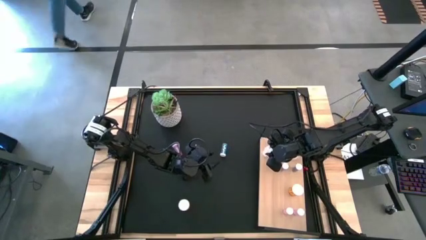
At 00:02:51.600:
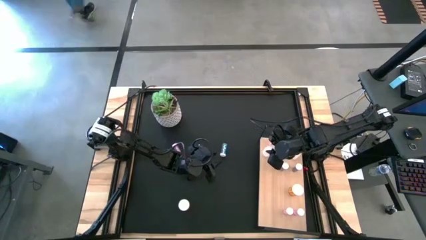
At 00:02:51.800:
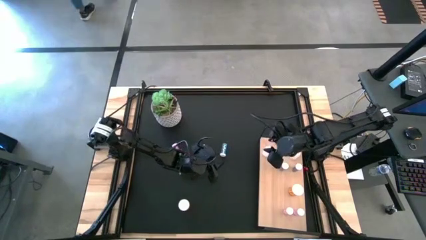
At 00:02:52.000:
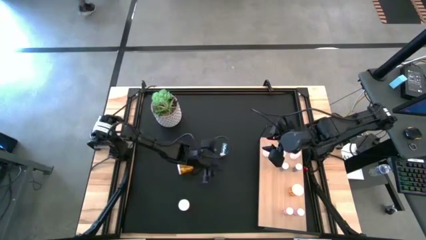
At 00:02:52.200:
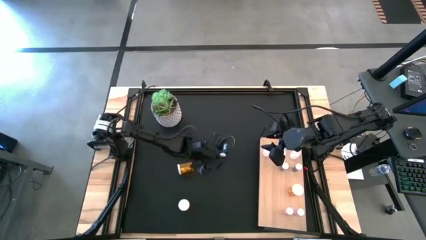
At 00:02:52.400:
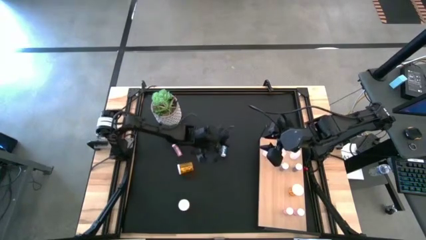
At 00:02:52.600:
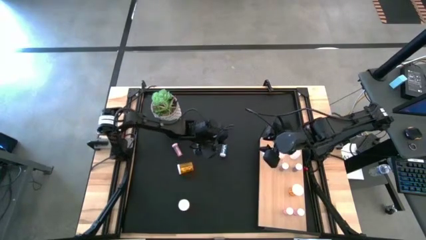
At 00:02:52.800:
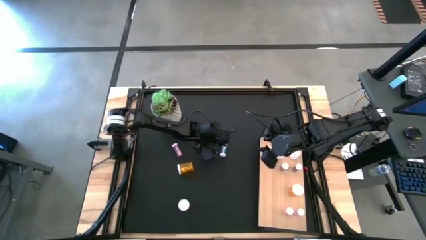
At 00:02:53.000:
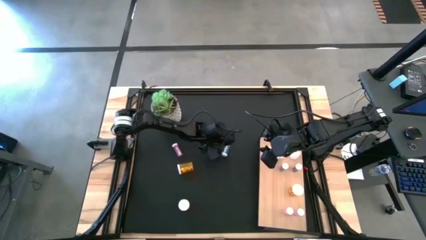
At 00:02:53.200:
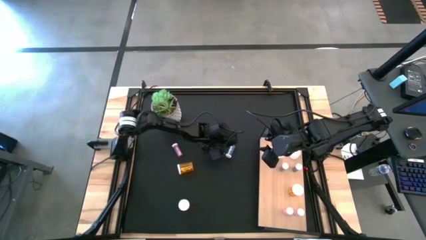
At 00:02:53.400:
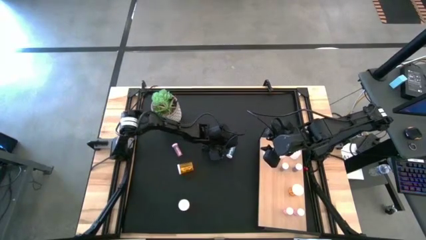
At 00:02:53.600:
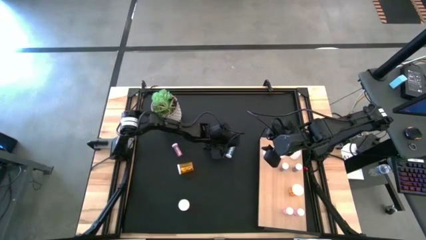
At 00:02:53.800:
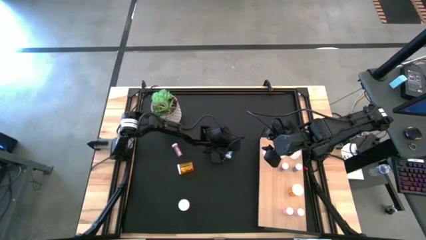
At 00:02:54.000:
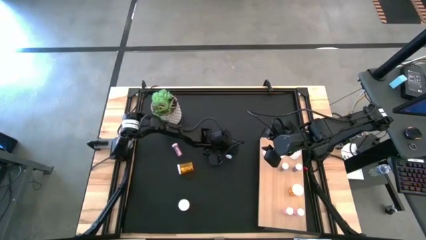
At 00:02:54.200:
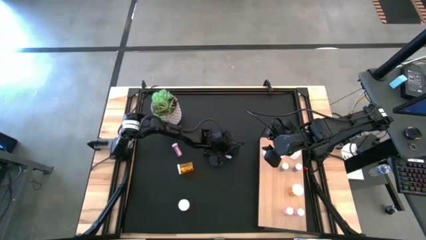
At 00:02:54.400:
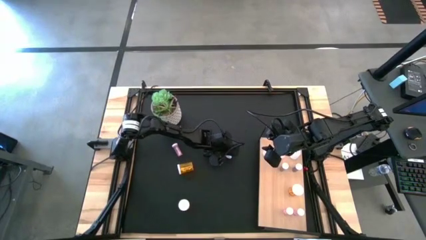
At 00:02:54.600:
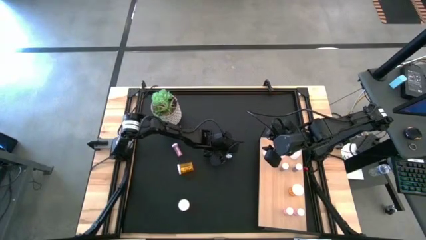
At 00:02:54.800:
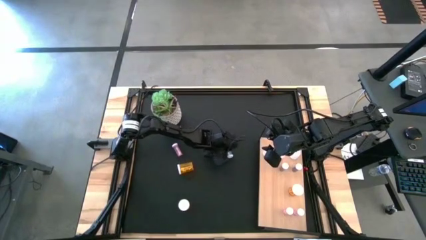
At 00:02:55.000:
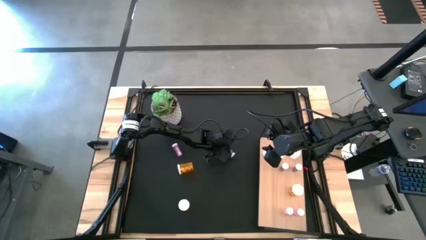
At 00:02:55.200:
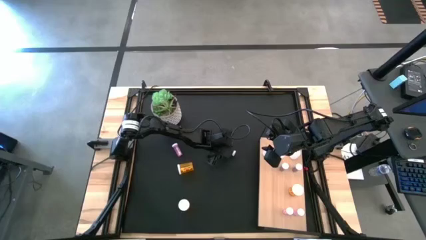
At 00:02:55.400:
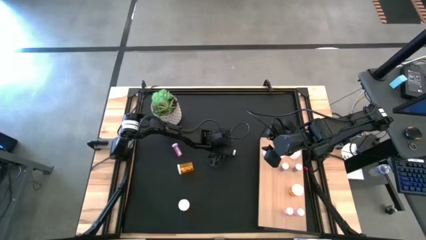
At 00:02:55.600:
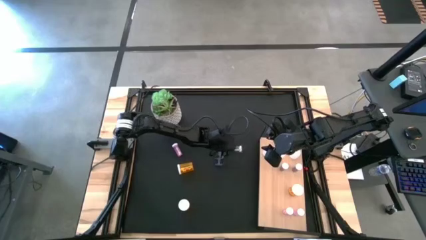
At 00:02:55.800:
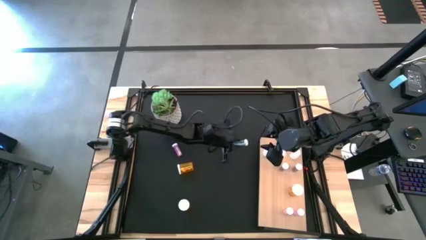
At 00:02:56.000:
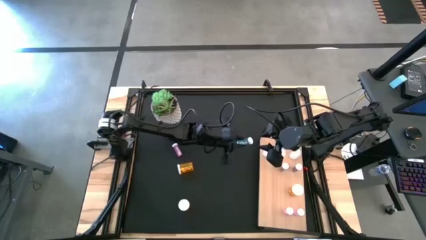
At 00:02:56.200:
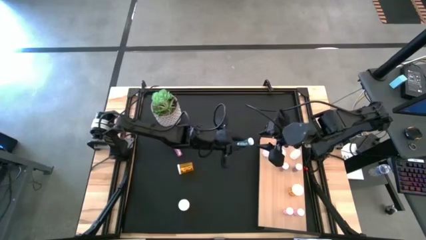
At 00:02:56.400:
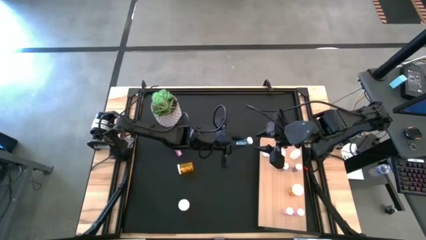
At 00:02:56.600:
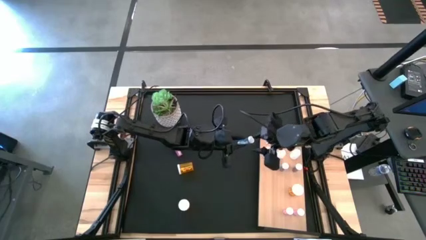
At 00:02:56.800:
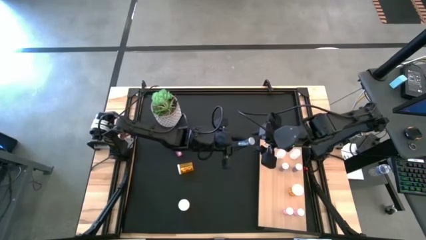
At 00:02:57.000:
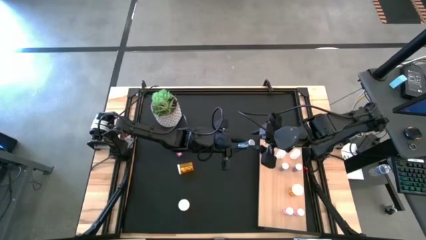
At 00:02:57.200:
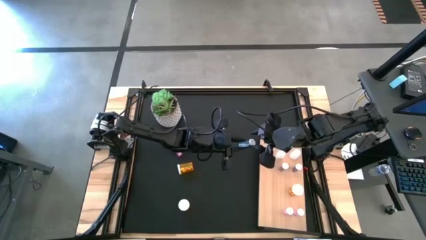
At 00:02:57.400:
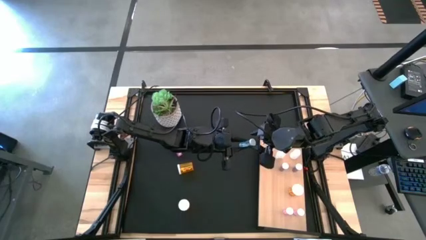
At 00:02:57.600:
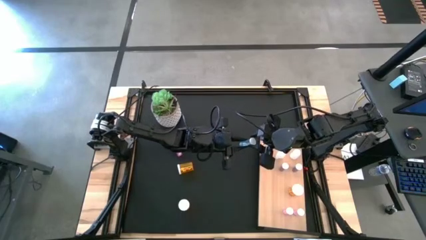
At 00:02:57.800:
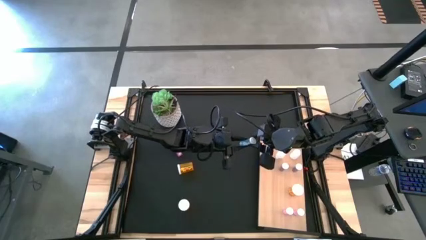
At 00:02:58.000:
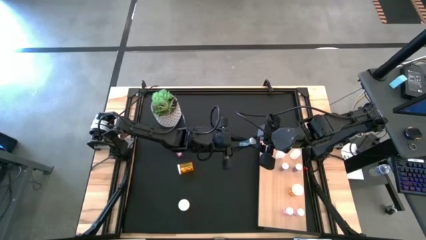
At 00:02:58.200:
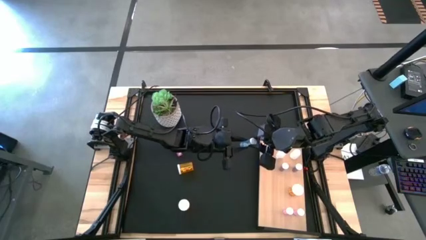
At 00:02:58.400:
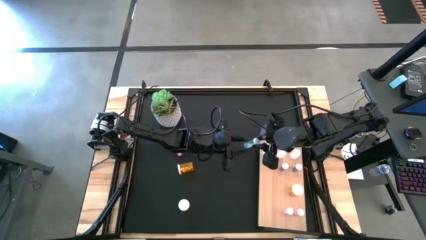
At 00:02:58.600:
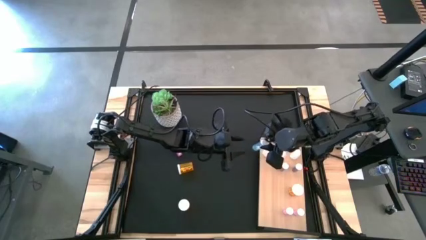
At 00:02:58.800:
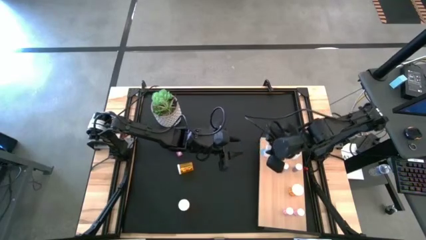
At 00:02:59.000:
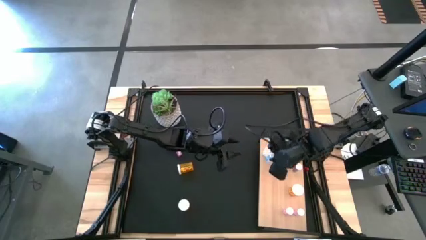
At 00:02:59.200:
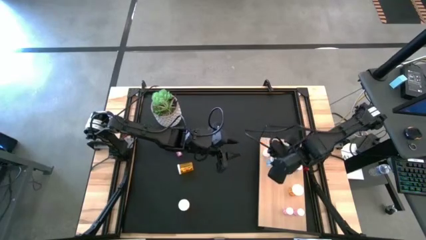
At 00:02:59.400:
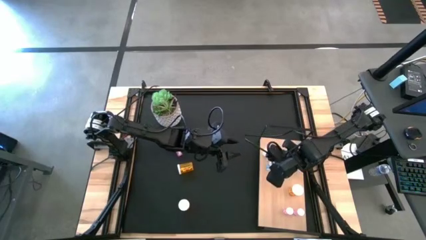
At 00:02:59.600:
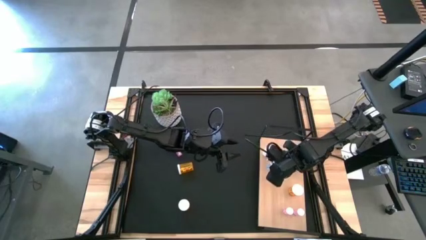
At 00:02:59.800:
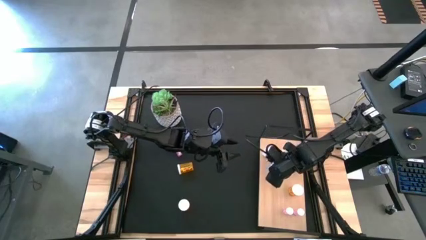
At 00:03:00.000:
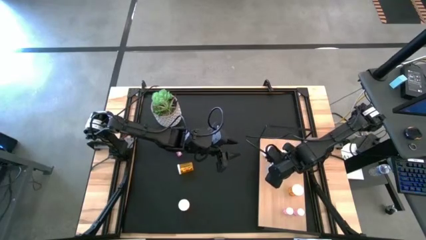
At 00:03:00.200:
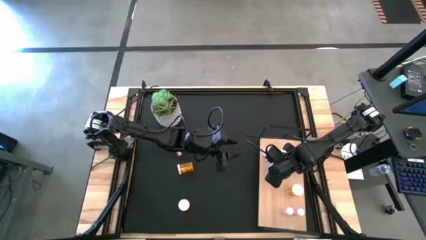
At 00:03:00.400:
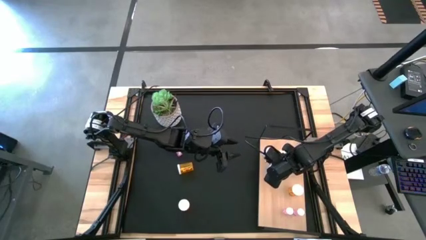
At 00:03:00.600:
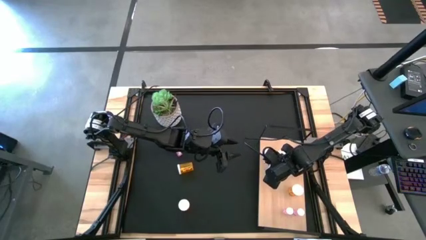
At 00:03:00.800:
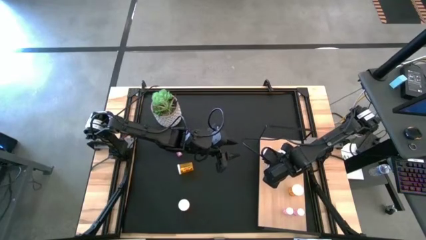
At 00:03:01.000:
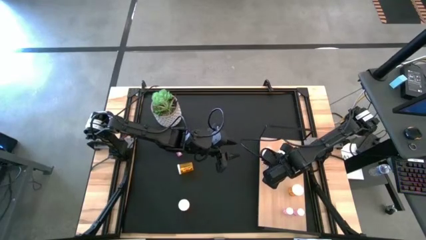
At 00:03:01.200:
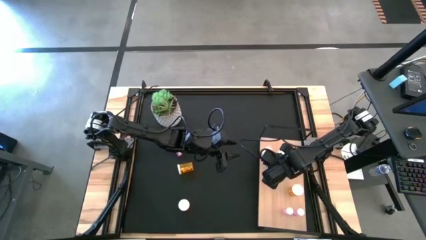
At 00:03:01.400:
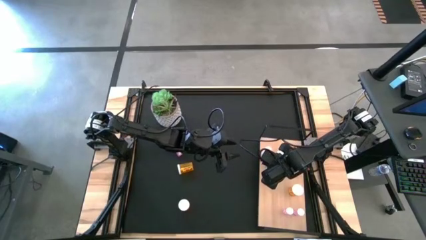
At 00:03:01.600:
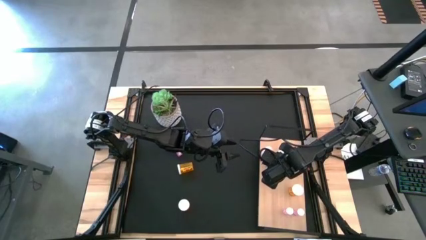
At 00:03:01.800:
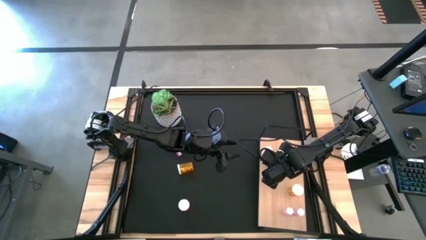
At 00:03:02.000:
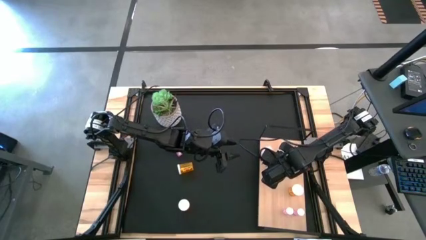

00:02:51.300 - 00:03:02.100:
Task: Pick and place medicine bottles onto shelf by color
Put the blue pill bottle on the shelf aligned with the other blue pill bottles

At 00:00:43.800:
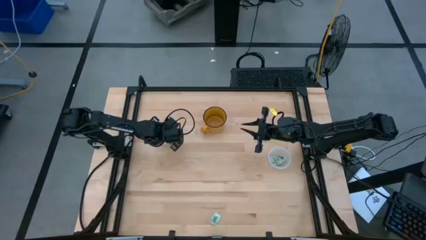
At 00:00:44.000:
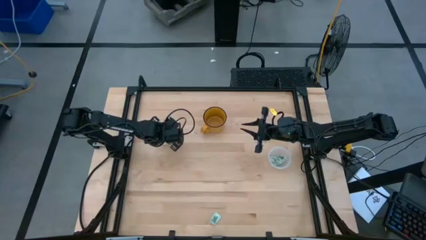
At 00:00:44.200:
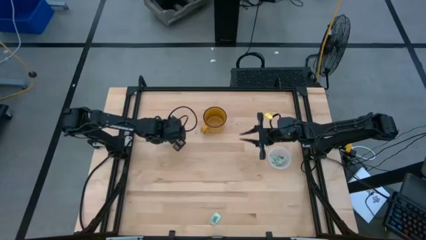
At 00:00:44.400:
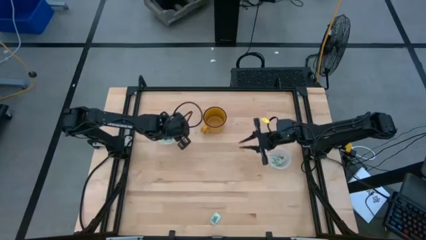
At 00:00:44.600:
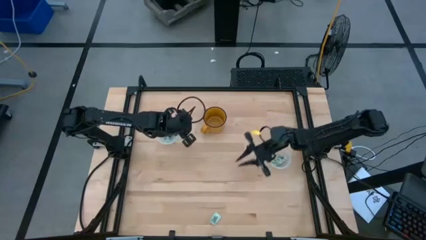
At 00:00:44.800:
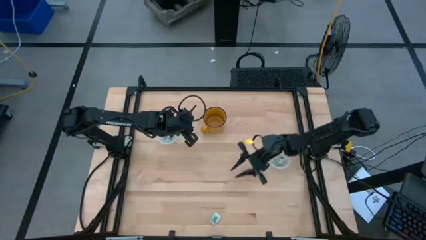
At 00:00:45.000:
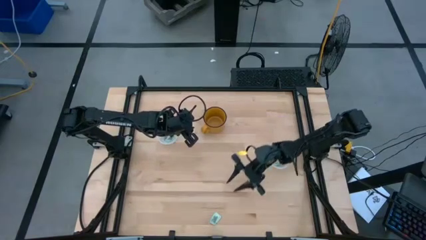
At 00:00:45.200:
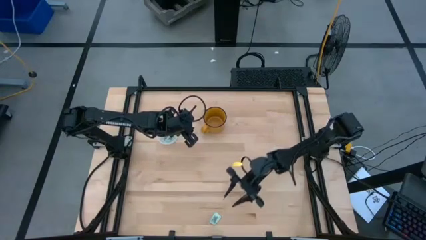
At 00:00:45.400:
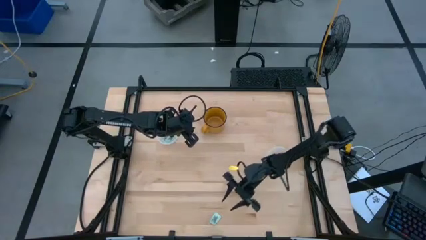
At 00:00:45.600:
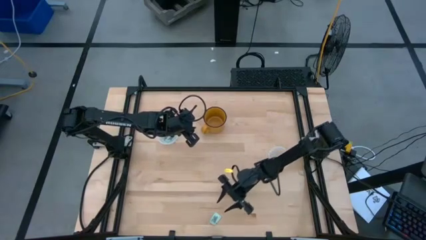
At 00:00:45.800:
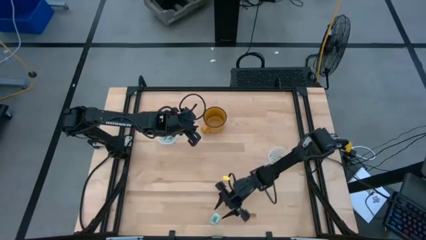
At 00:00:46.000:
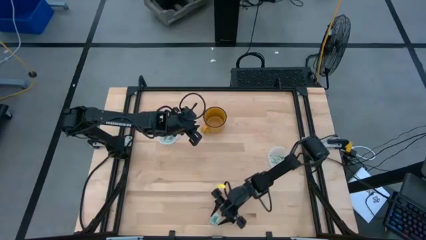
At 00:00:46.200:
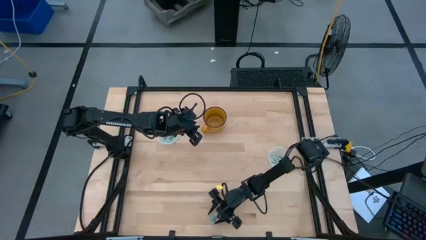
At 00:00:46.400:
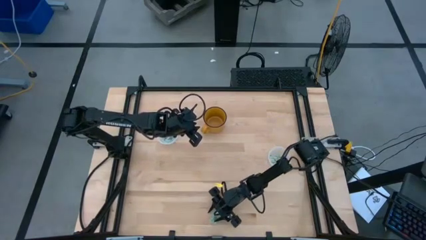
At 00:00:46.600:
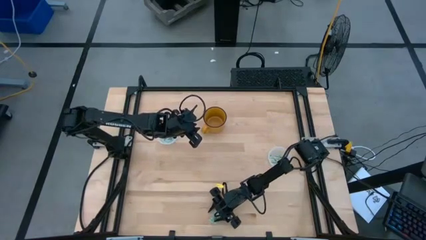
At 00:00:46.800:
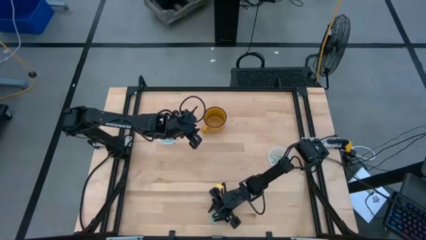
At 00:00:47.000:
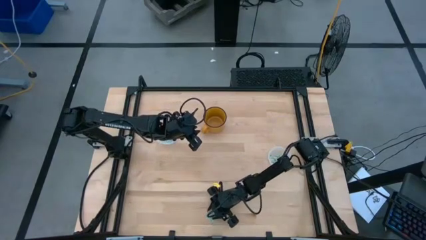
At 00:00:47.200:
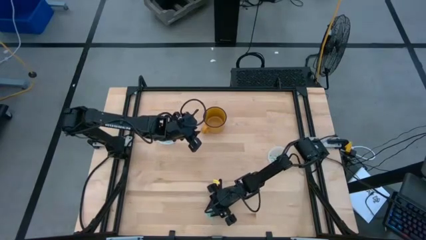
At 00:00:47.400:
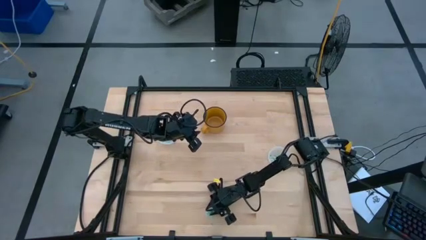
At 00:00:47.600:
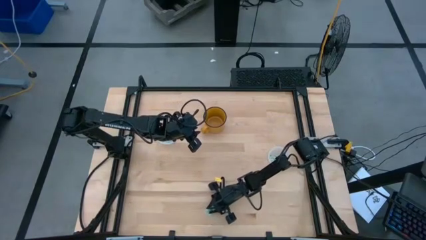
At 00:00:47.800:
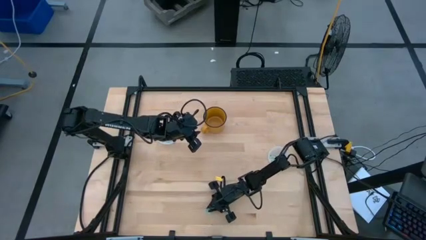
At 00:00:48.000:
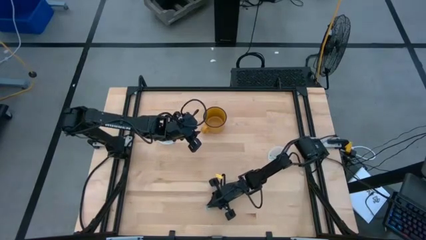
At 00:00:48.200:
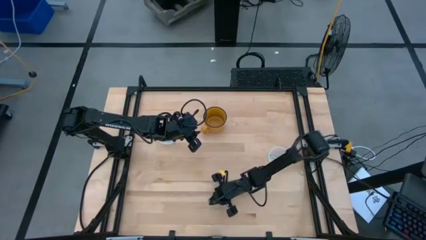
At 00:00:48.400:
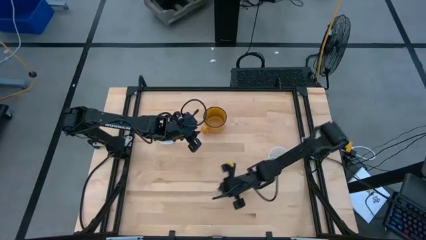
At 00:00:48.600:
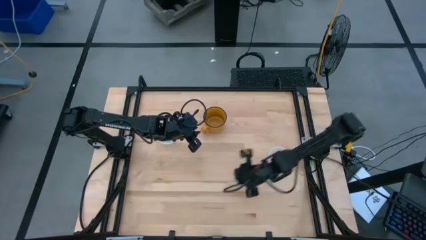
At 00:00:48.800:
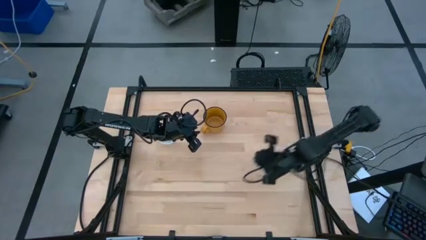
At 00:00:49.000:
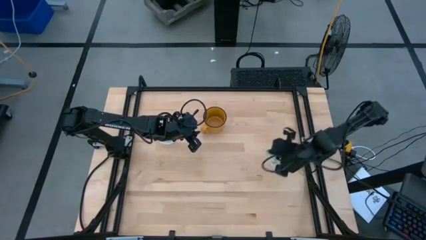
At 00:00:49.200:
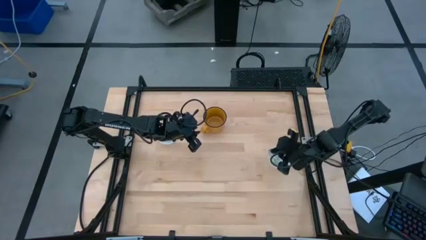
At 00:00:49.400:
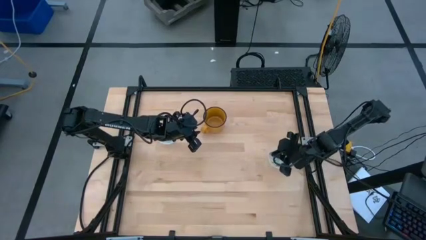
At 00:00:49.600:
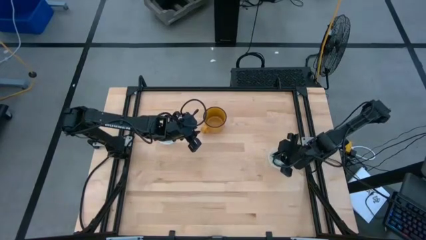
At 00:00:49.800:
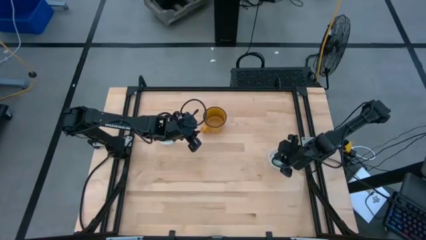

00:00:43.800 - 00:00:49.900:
Task: Pick and place Stevia / Truvia into bins
Put the light green stevia packet into the right transparent container
